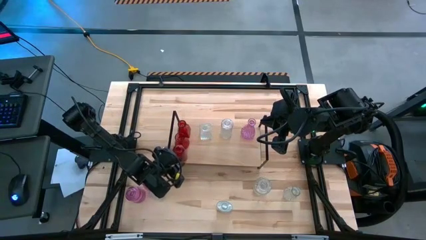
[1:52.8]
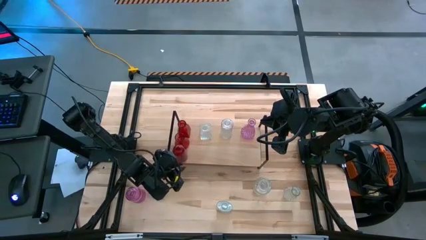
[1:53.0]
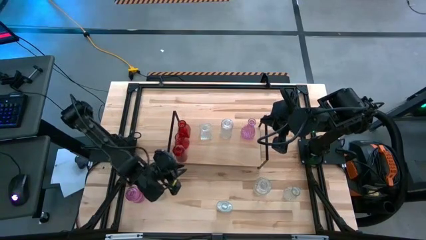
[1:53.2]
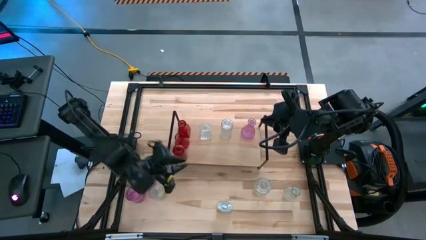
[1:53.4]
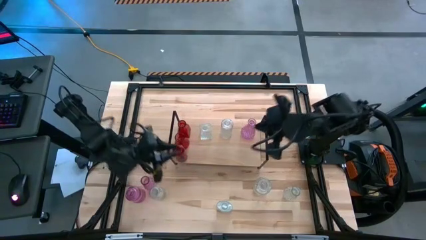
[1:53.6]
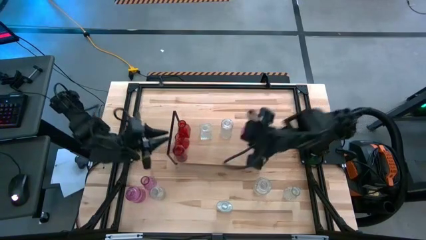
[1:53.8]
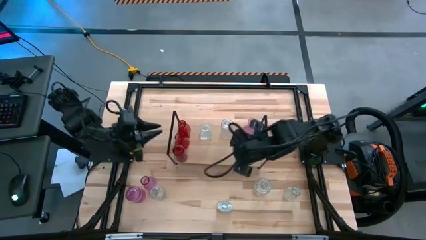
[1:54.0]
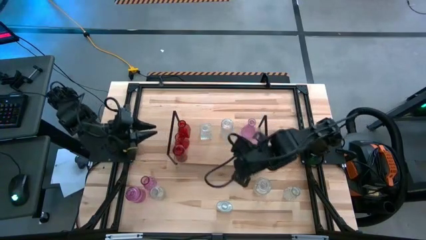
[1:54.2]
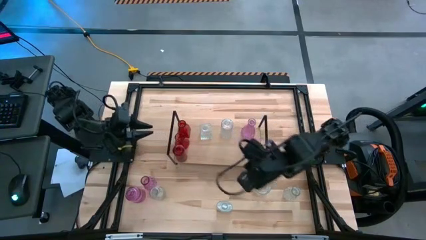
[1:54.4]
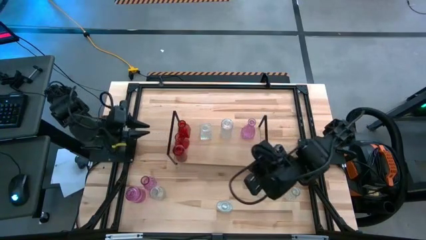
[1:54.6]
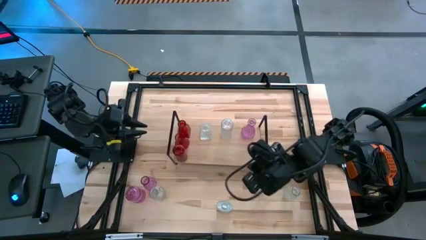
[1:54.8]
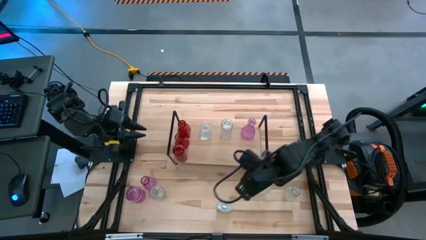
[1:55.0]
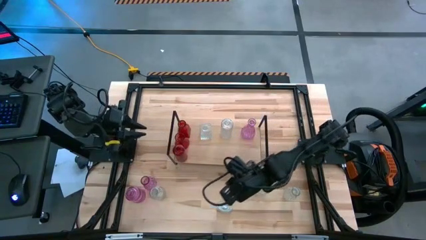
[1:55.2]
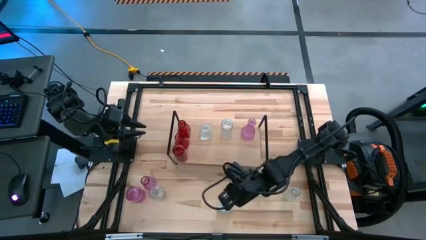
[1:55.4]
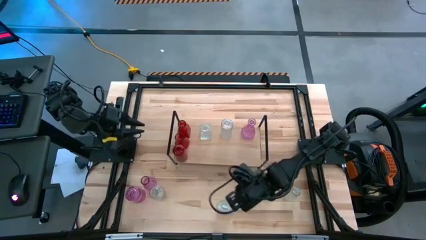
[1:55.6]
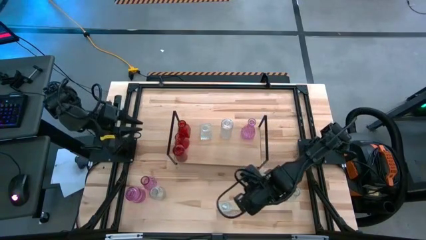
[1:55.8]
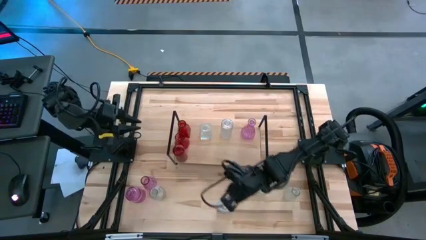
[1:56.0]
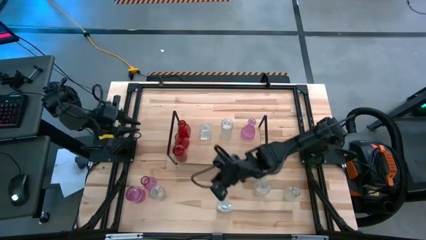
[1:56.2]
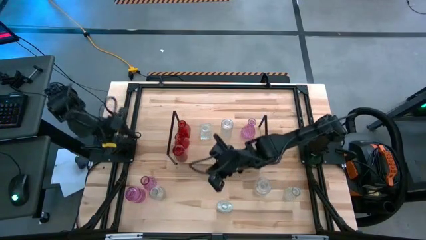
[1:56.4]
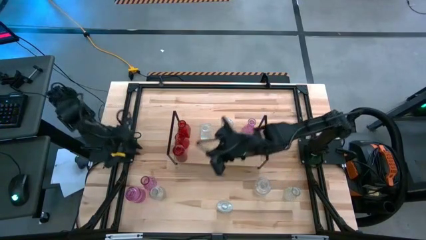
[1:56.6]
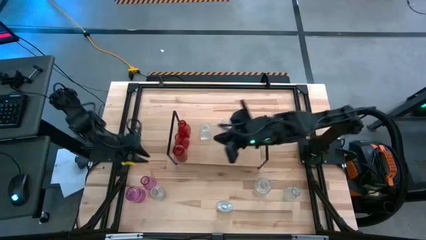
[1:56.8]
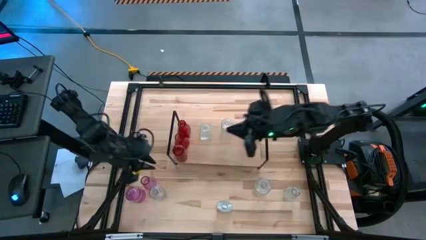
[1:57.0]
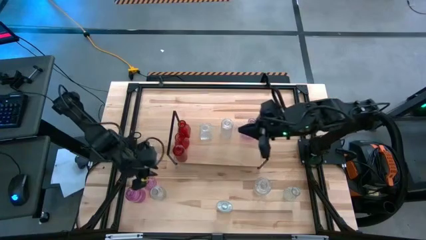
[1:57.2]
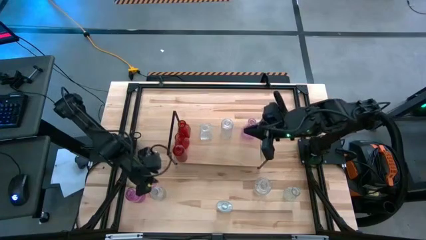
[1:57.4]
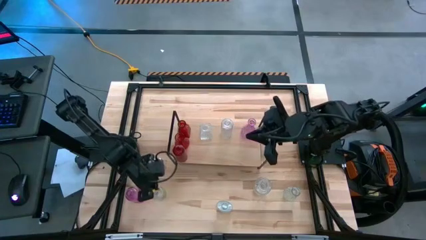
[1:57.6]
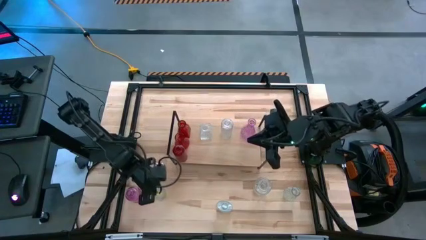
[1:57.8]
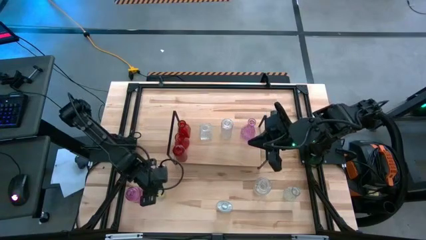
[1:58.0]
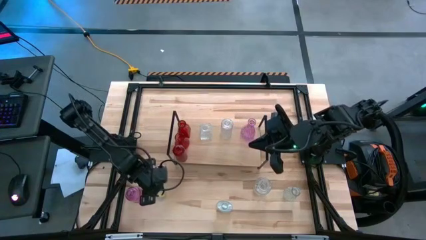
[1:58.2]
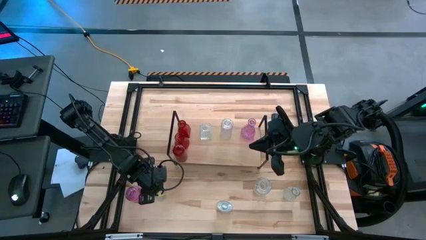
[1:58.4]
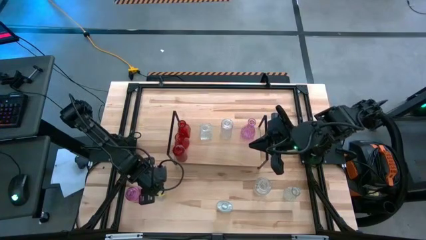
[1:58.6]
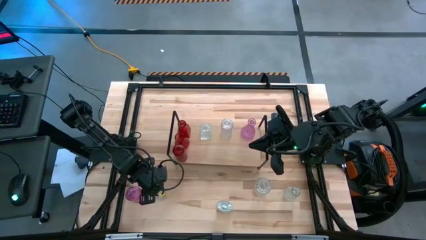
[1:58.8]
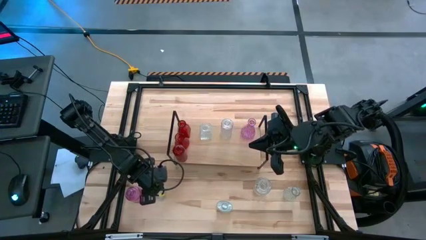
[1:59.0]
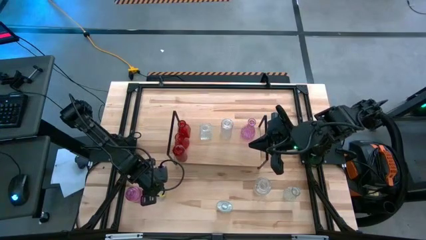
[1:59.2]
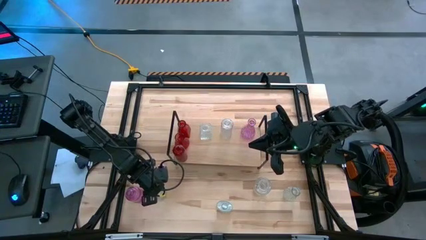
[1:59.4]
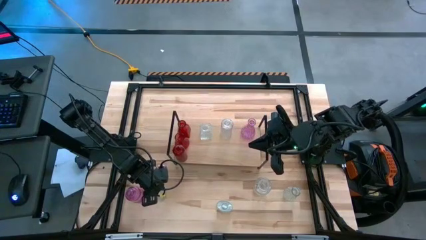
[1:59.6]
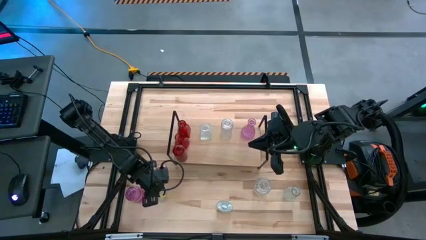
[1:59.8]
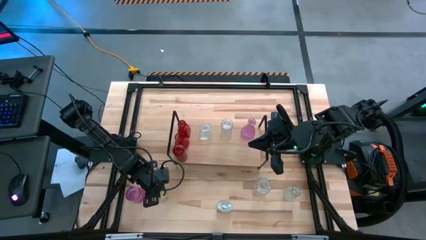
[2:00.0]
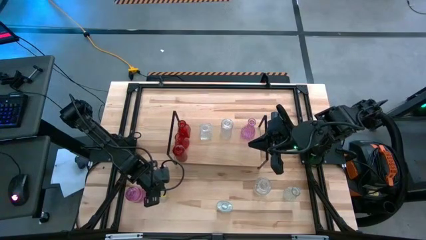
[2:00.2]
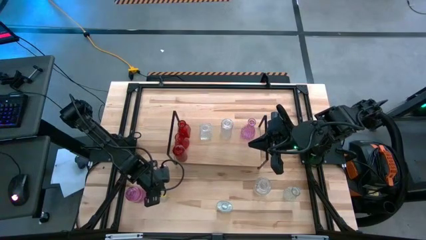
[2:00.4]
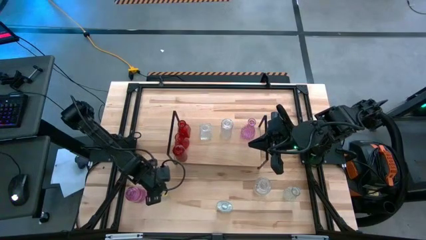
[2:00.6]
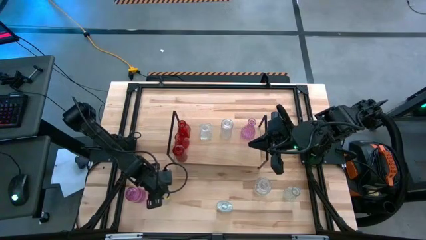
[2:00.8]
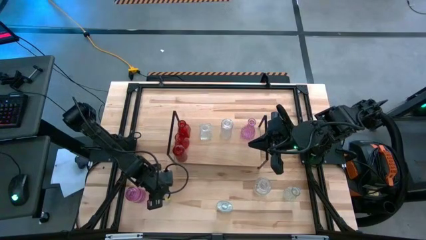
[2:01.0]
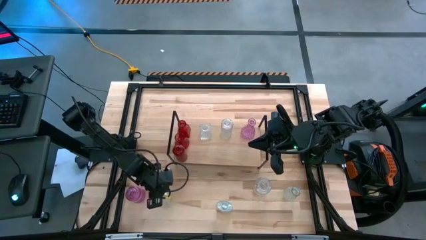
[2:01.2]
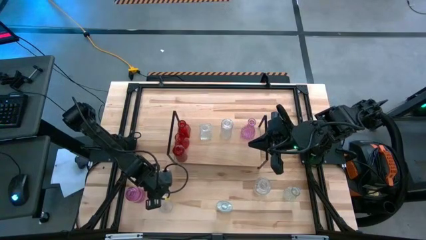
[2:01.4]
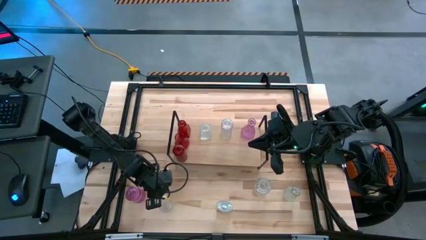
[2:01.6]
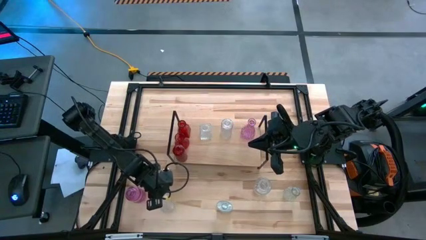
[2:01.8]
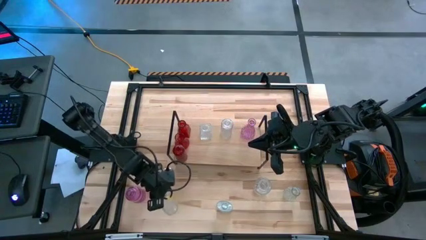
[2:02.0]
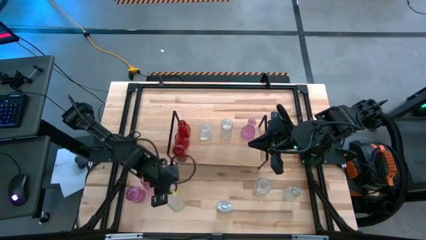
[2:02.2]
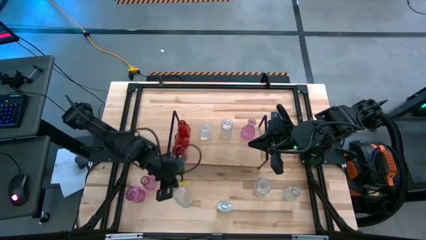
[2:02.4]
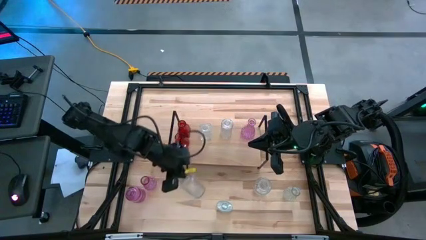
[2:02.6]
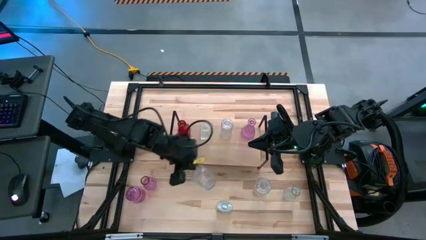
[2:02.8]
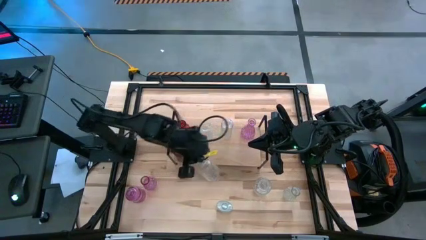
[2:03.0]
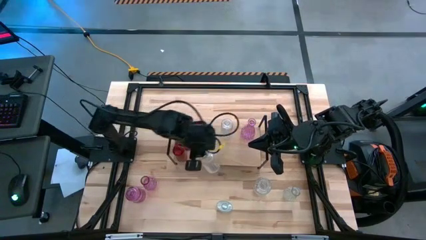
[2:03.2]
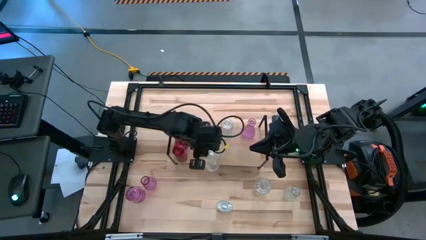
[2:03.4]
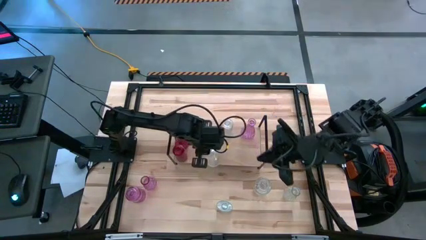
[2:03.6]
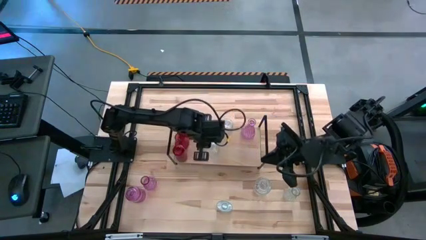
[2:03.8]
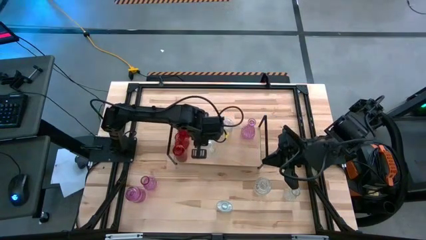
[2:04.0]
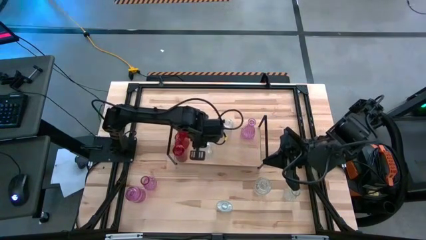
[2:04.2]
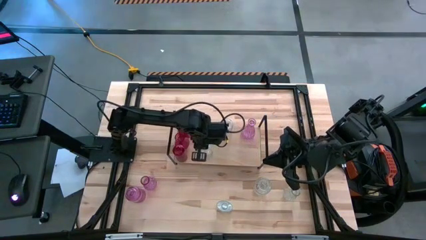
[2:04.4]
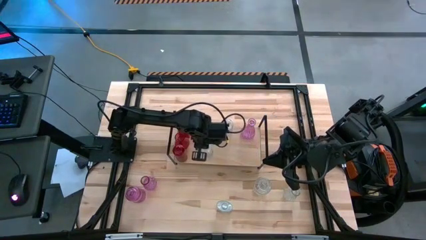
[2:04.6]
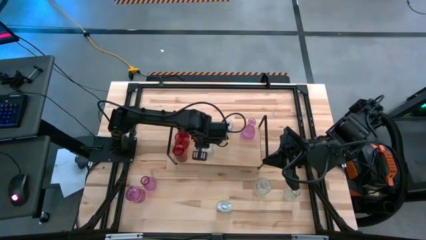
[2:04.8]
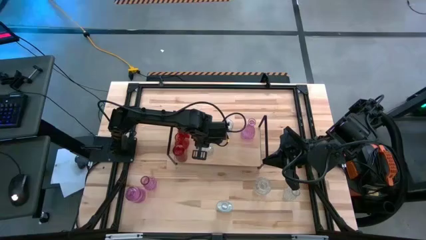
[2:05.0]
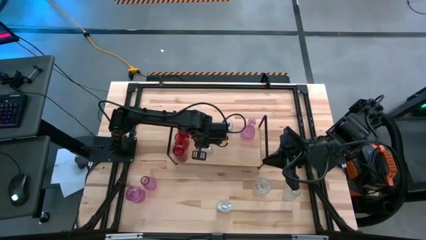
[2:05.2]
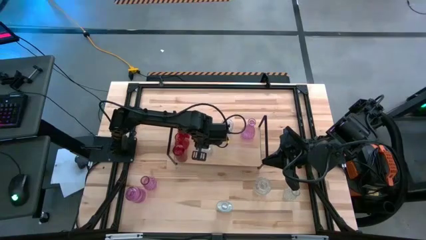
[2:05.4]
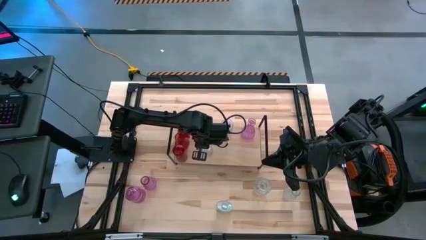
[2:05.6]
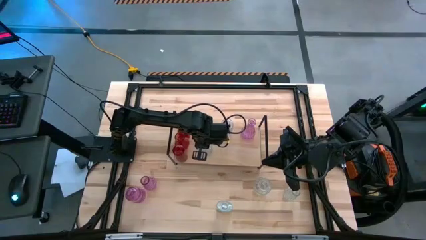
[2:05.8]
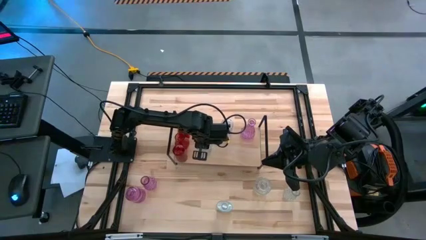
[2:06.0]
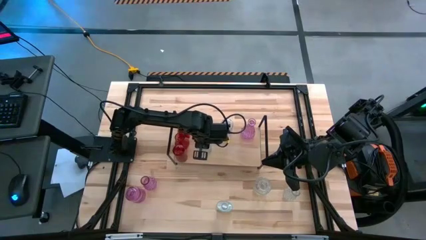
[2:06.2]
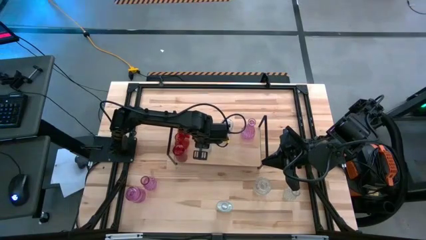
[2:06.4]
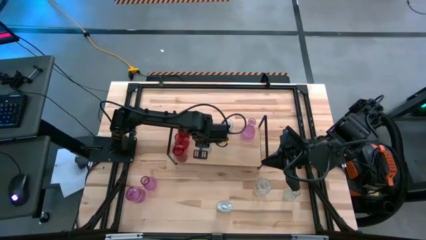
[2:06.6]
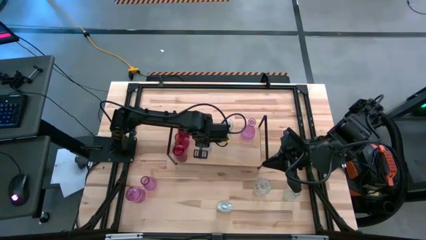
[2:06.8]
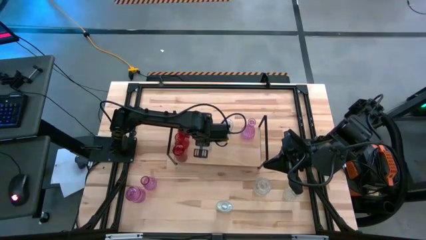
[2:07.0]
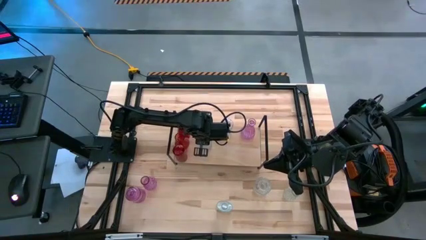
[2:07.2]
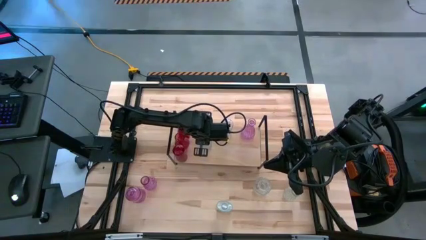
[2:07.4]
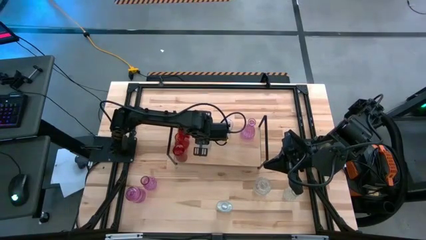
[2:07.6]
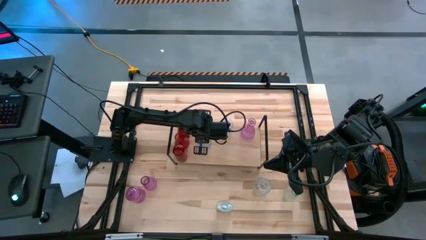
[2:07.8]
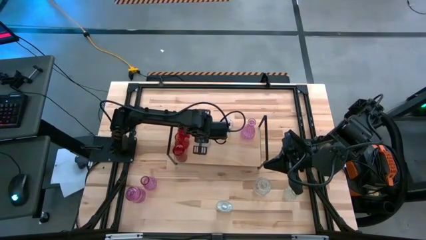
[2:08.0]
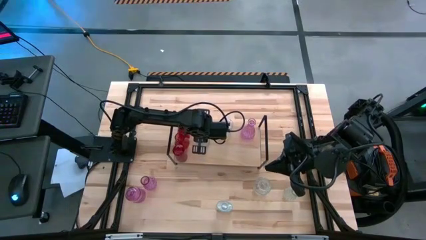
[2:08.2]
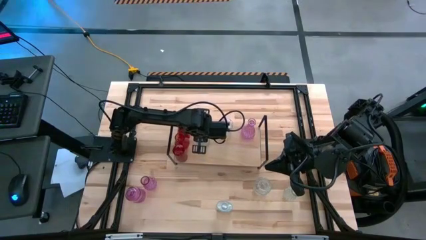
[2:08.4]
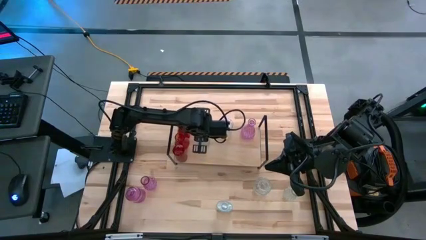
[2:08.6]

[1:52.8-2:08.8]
Task: sort vases onto shelf
Put the transparent vase aligned with the other transparent vase on the shelf
